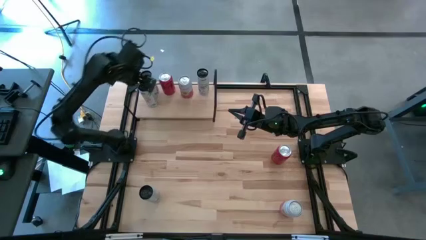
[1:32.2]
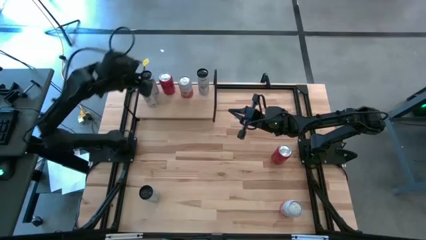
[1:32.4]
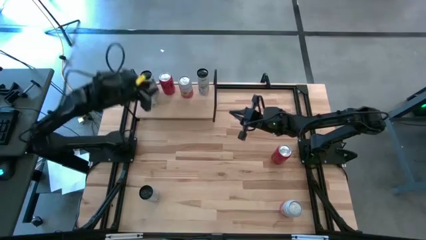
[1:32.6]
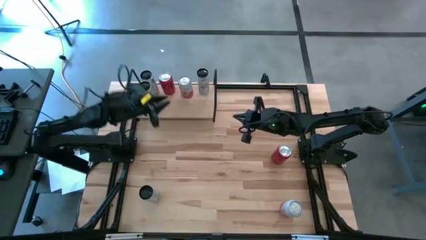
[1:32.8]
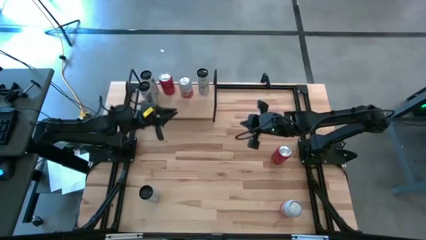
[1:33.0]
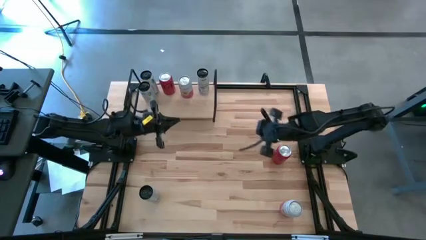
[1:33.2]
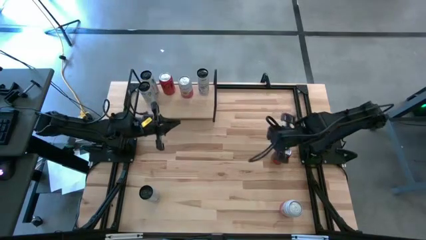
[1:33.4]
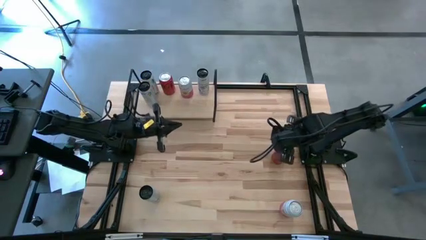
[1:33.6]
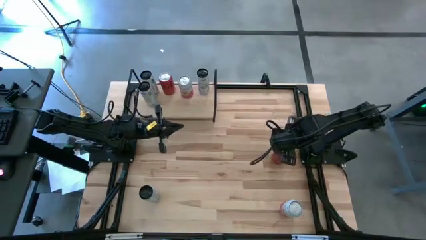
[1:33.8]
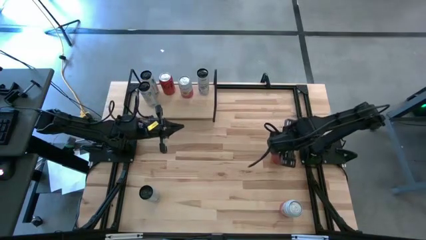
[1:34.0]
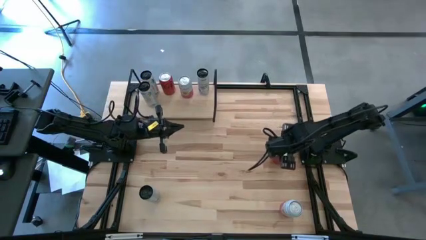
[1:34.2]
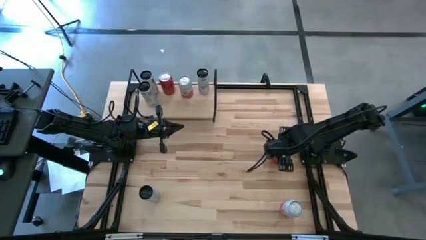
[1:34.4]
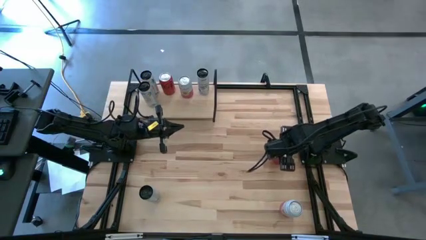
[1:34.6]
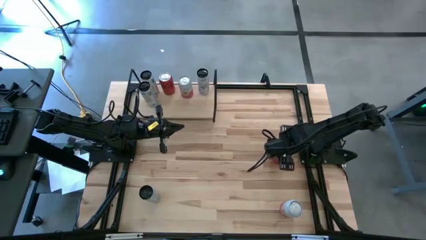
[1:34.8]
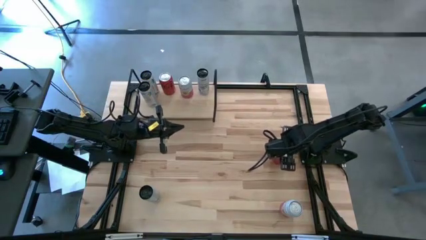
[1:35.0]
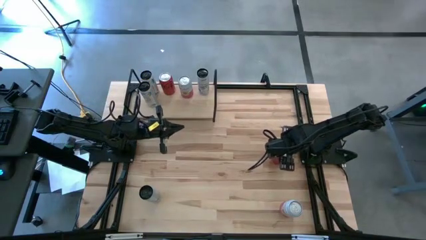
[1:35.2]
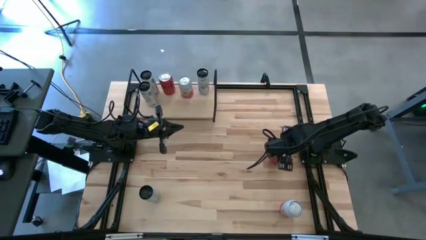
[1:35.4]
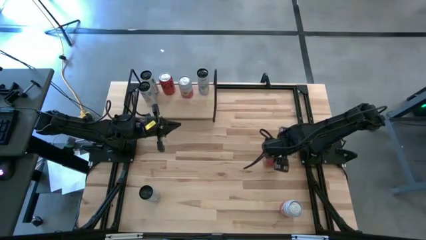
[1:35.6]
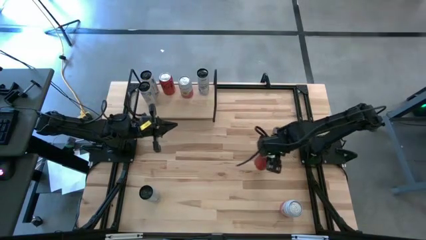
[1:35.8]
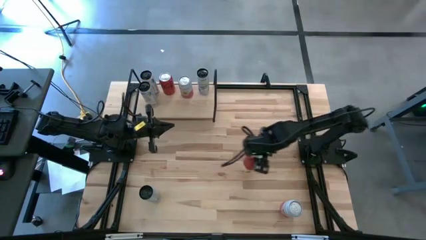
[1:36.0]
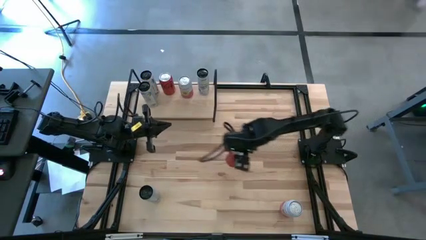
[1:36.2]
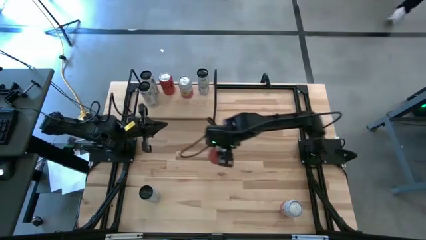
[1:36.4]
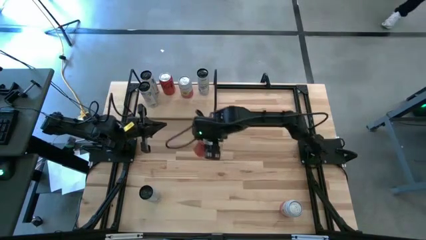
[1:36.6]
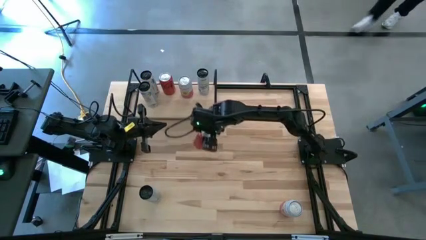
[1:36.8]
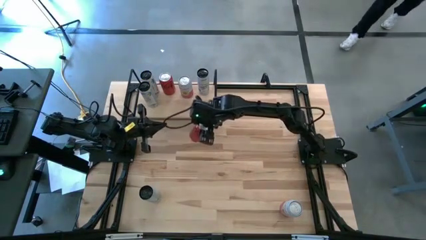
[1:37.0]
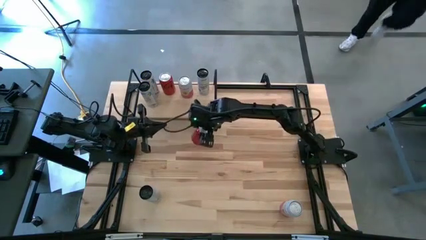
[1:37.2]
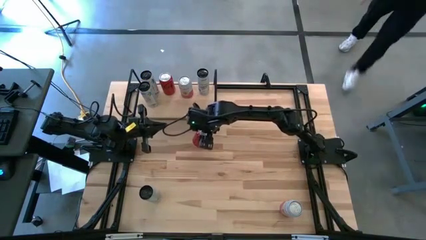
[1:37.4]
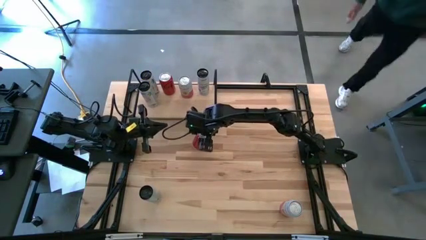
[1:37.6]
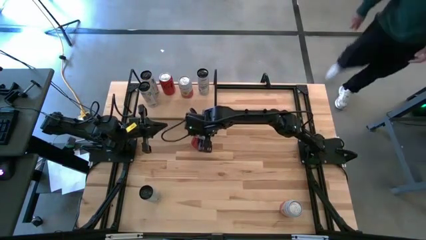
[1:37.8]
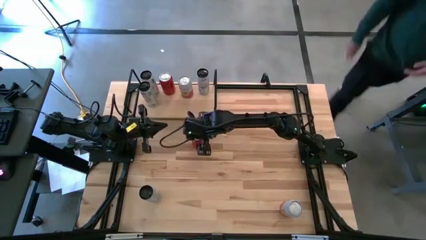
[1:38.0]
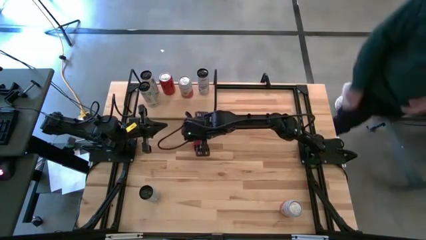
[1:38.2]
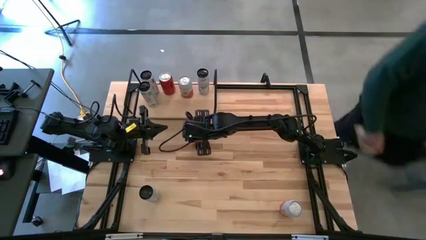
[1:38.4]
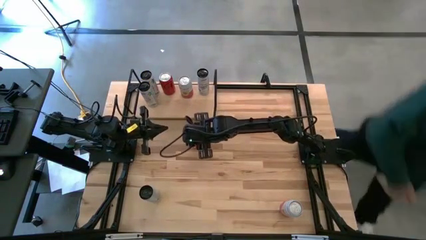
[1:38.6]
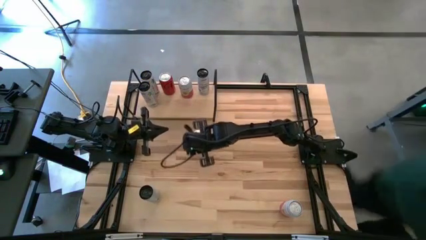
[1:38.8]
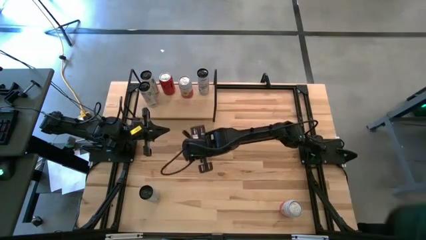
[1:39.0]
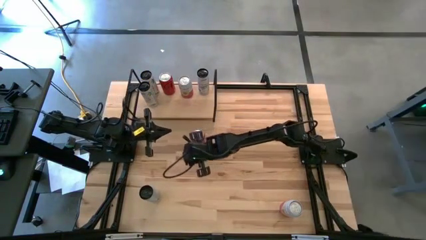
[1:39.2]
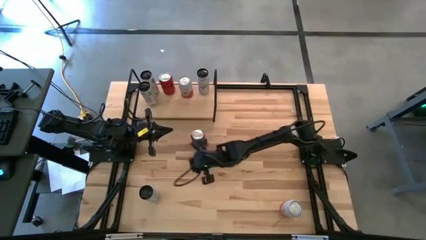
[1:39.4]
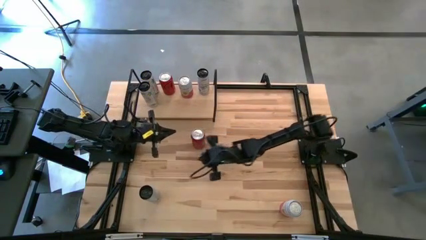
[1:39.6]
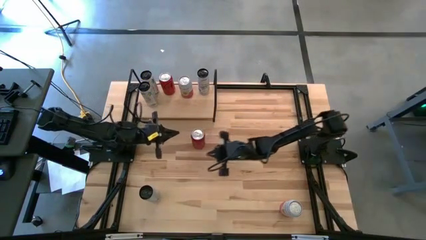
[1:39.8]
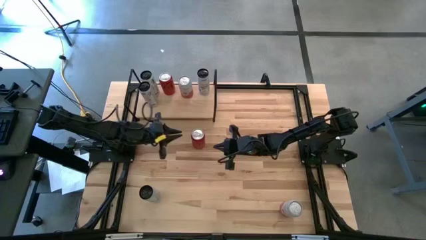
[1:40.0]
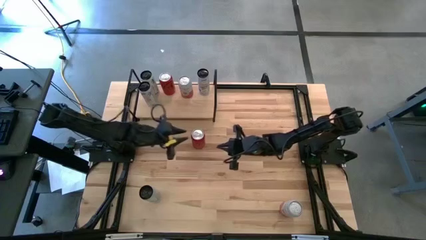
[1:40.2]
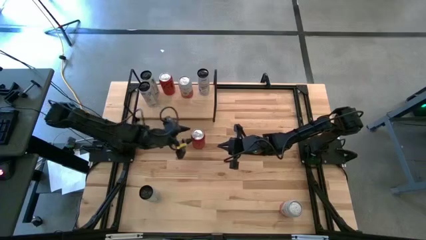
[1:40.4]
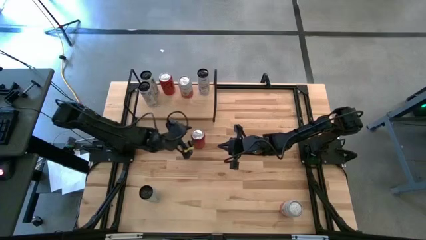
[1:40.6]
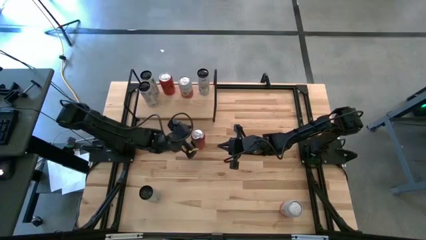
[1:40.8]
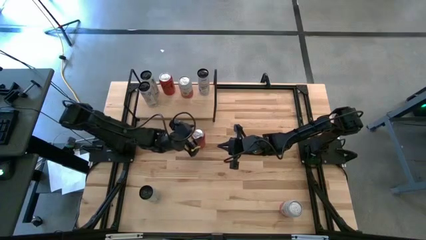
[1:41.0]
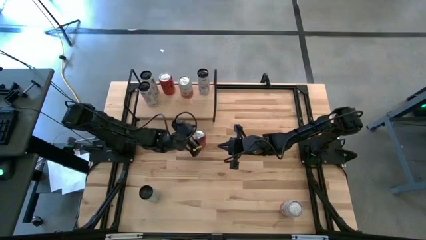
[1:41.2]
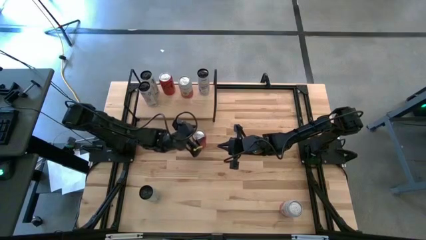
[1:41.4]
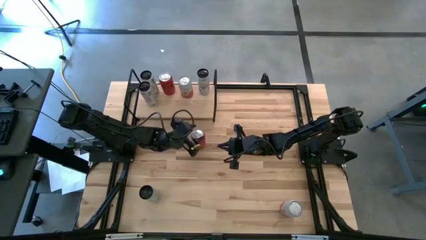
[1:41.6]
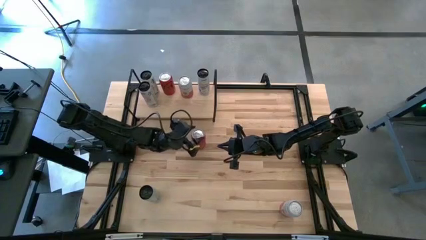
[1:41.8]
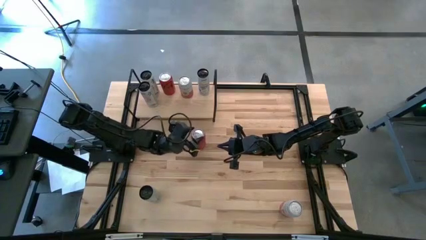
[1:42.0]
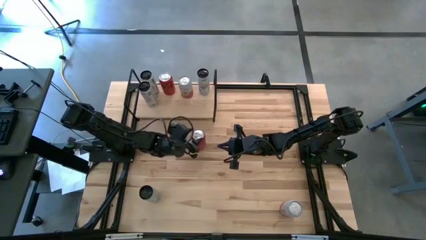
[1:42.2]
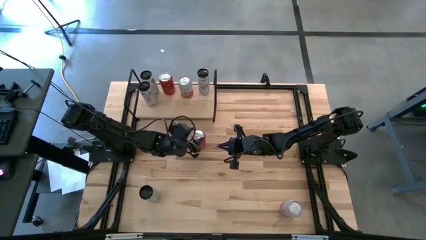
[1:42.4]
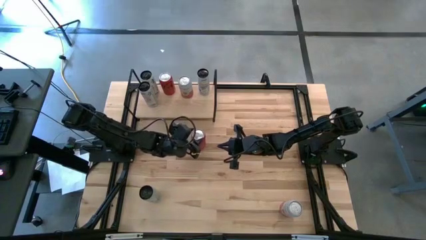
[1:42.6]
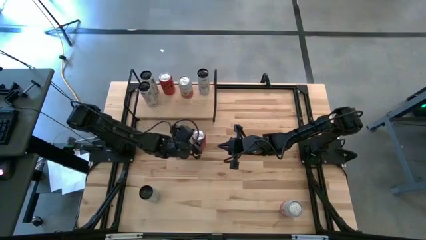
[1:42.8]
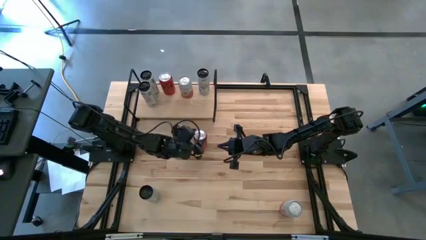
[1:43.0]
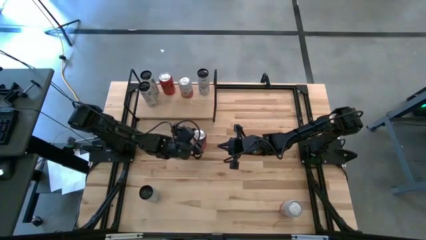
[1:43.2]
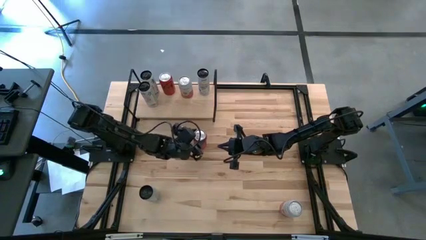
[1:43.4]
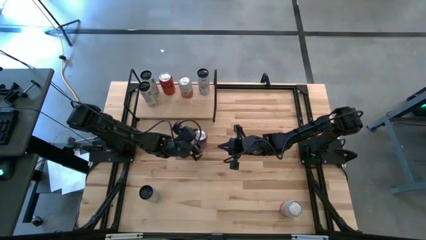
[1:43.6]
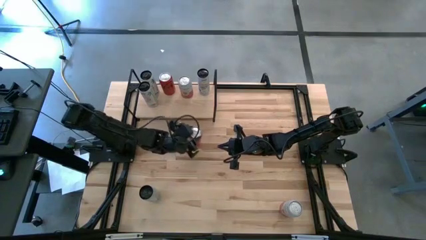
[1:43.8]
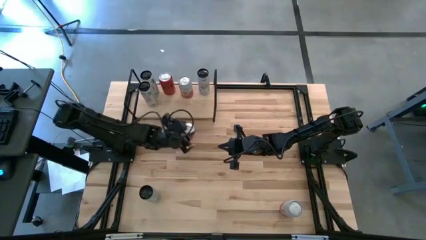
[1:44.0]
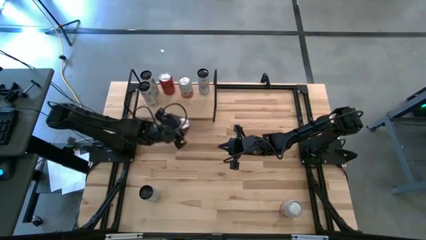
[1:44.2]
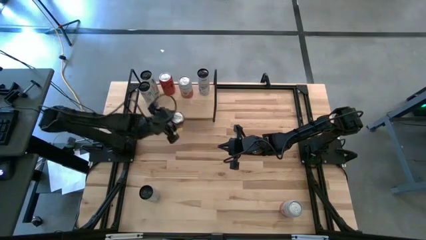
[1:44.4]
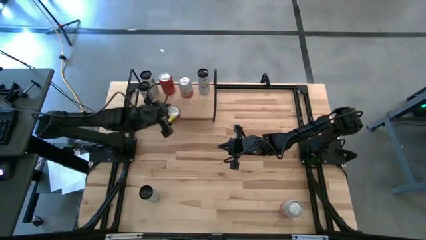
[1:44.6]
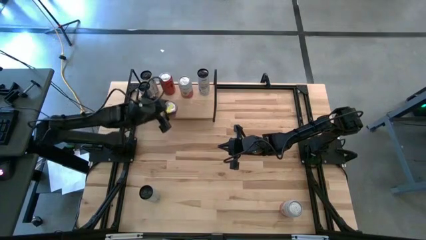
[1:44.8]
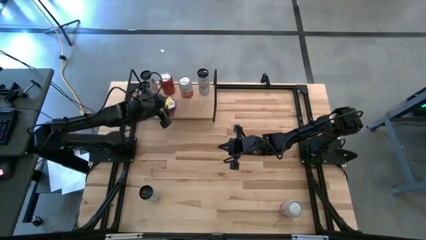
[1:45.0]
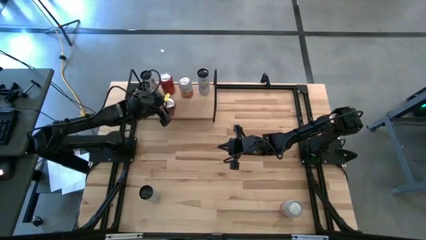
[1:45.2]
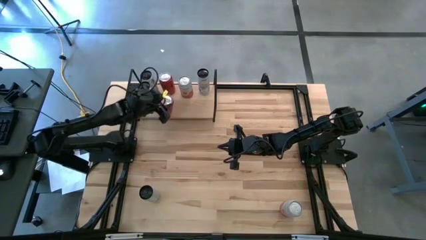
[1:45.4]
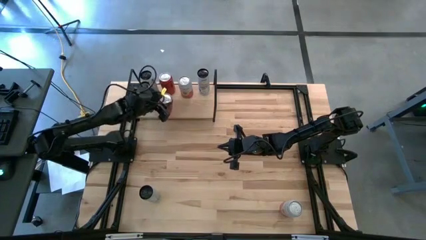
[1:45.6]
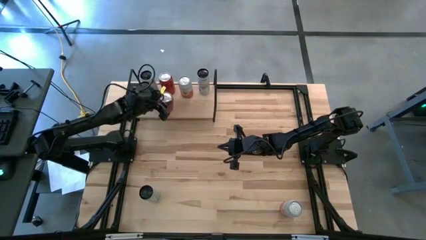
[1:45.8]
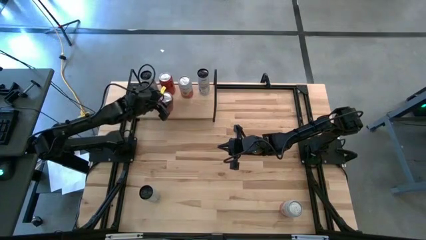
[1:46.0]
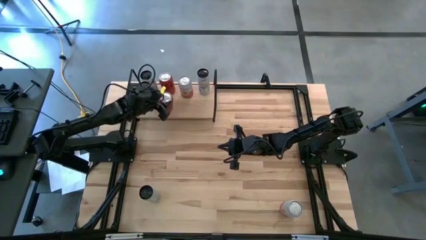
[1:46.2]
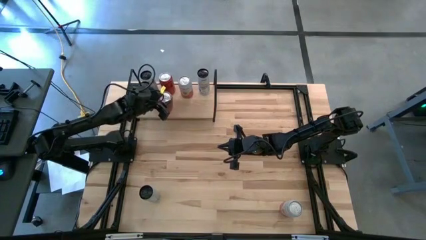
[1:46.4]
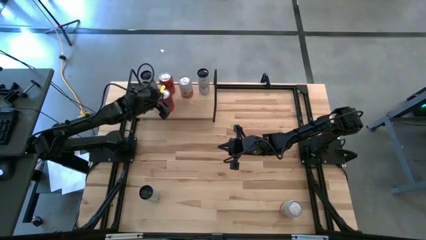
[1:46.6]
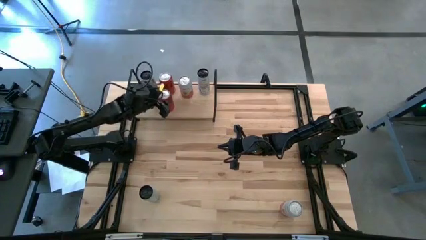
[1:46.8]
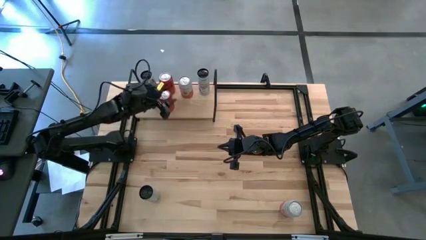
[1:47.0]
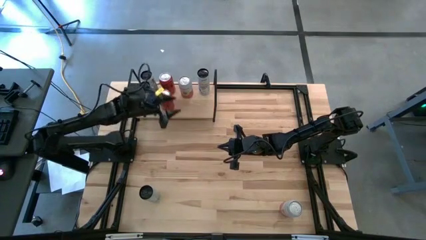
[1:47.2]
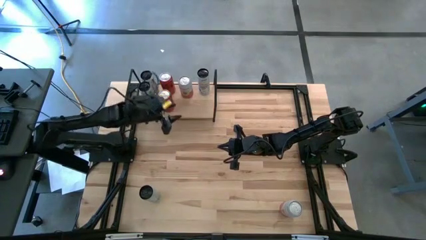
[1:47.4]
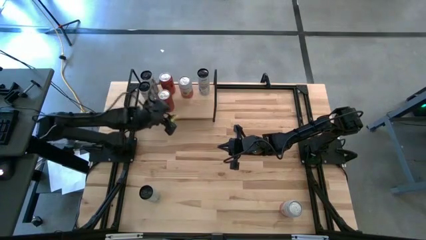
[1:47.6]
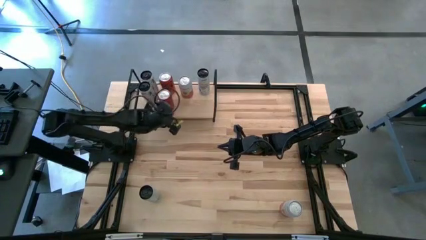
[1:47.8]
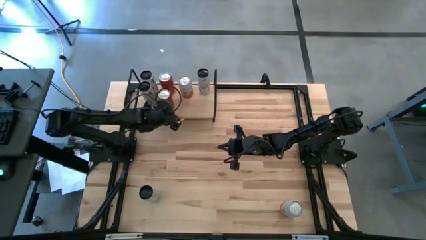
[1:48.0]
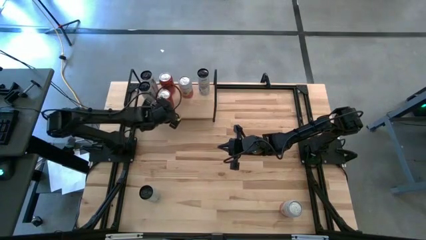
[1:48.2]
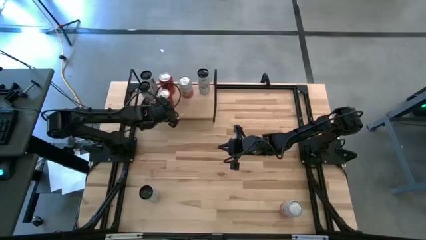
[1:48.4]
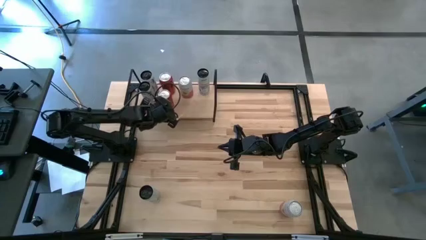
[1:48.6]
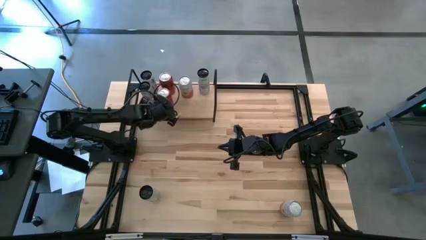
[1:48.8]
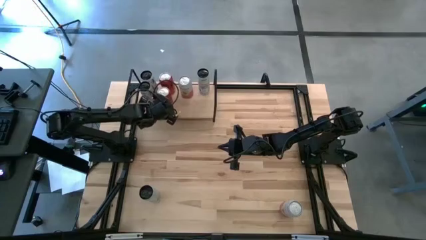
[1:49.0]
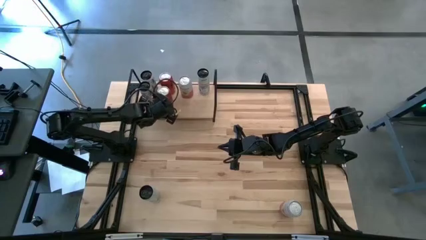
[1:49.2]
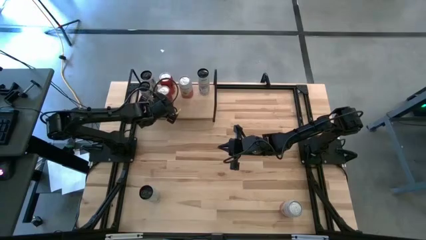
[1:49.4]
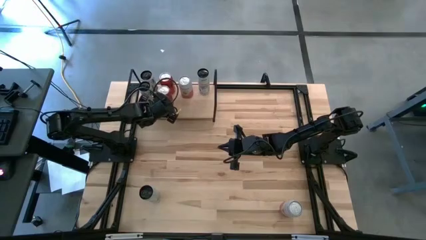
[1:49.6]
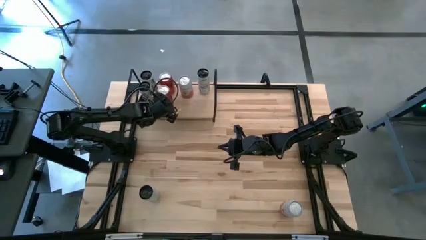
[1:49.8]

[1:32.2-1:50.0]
Task: Place canned beverage on shelf
Put the red-black soda can on the shelf aligned with the other red-black soda can
